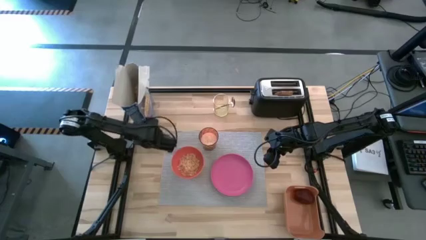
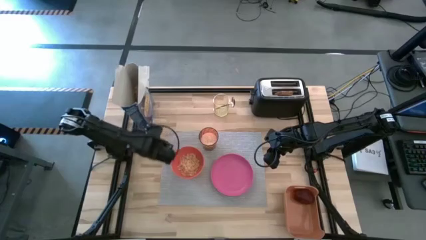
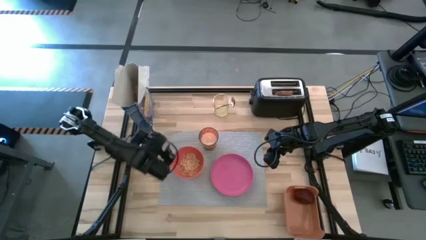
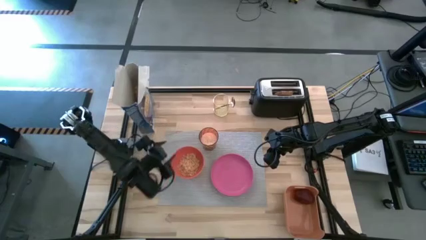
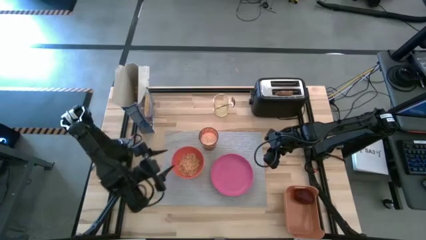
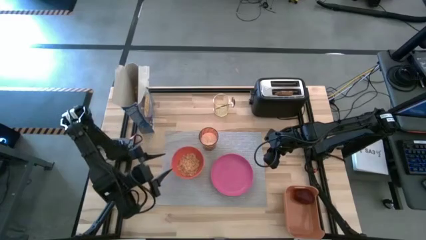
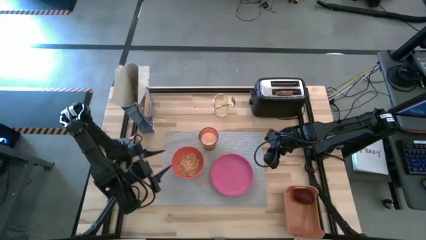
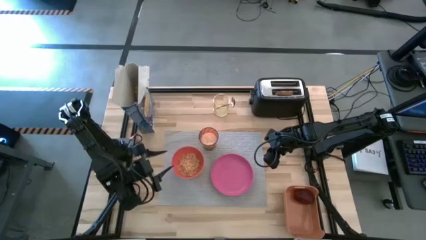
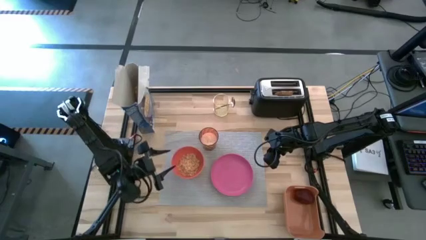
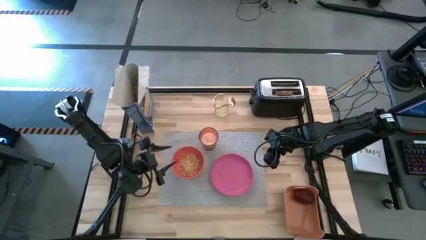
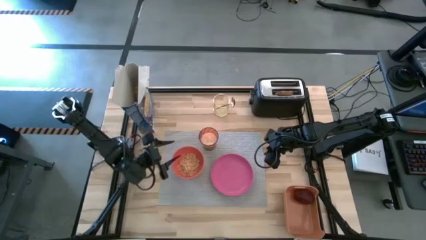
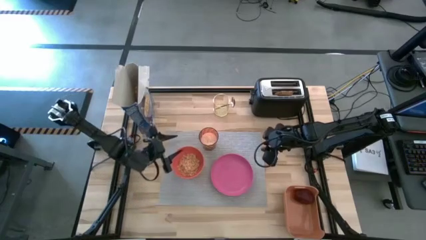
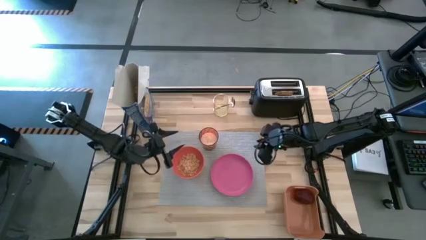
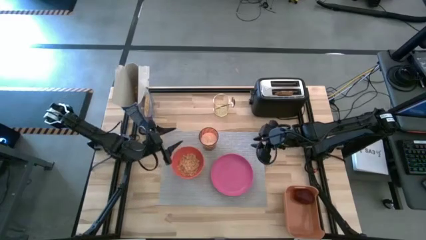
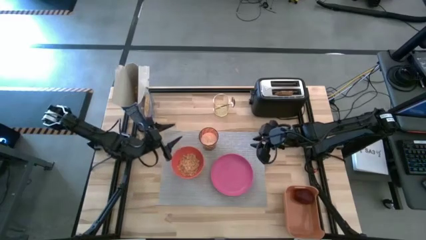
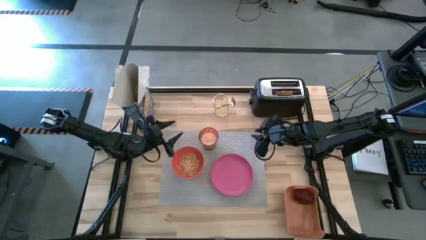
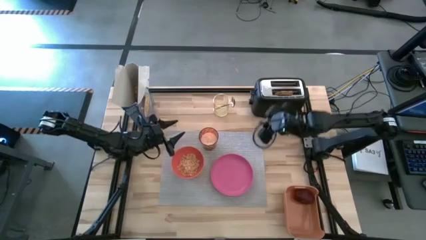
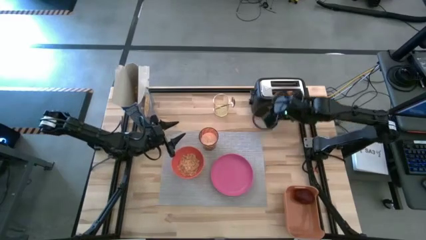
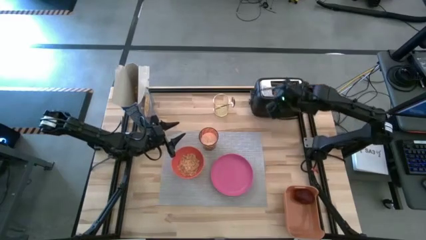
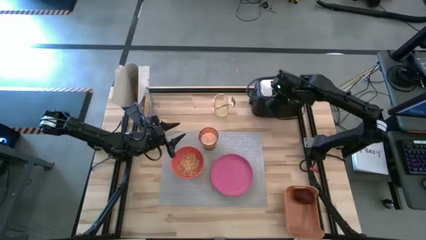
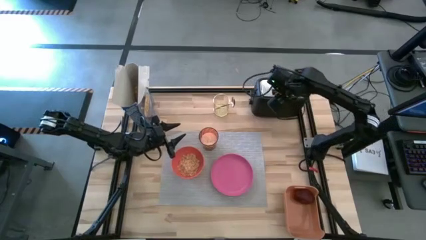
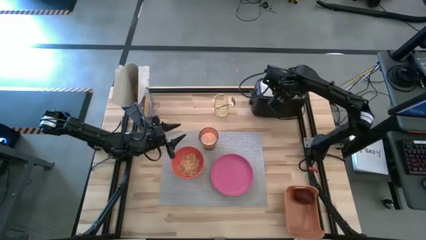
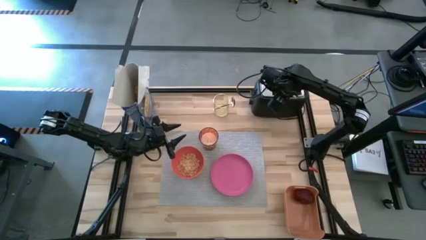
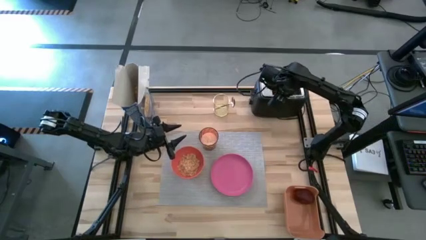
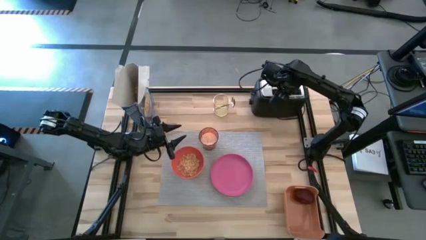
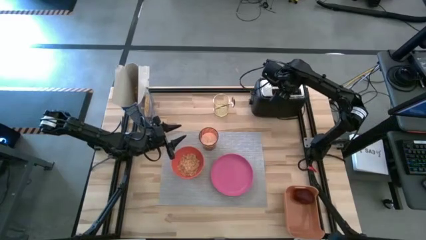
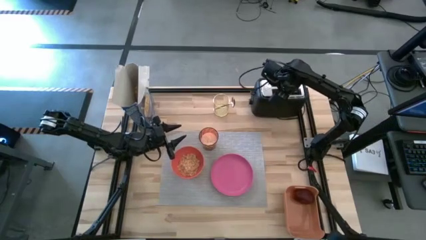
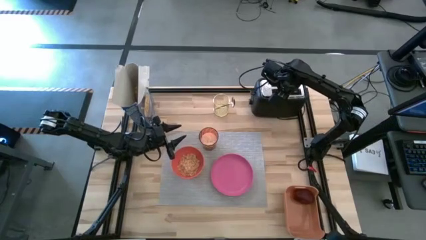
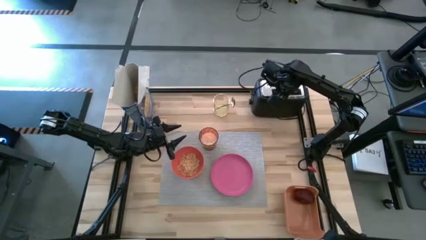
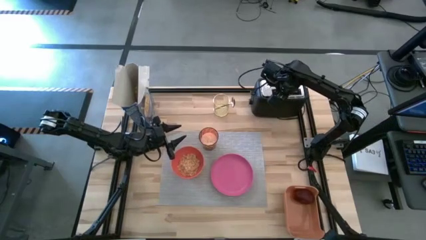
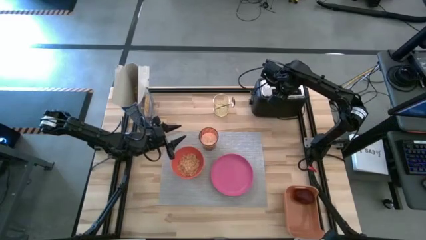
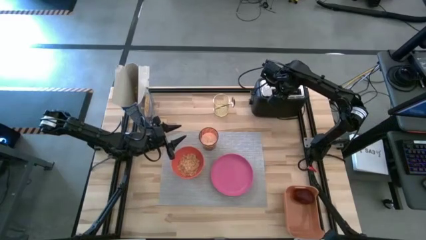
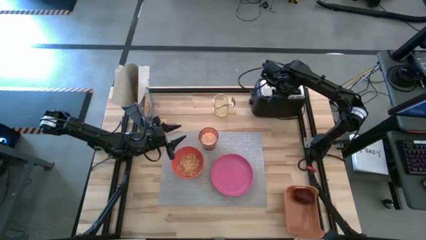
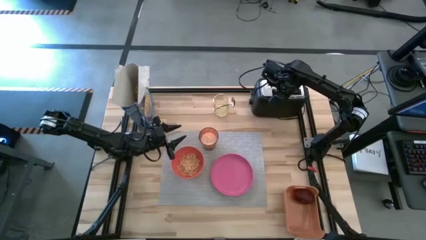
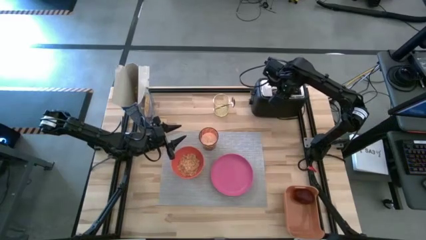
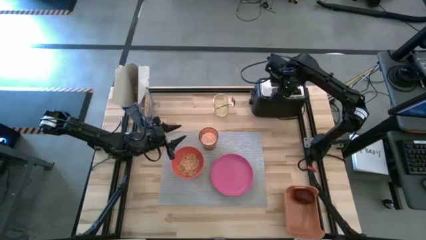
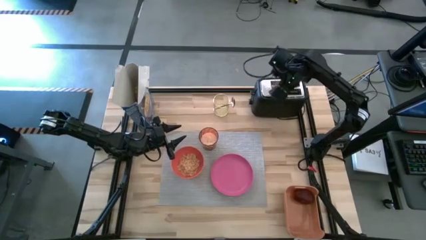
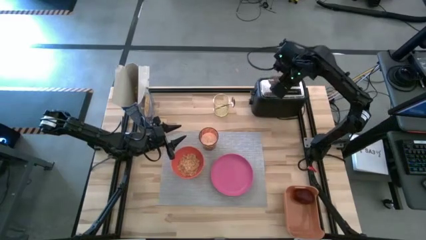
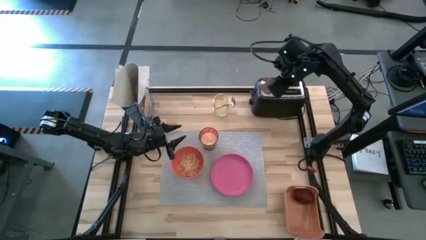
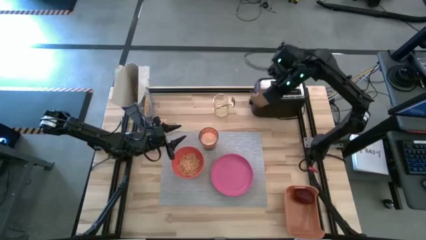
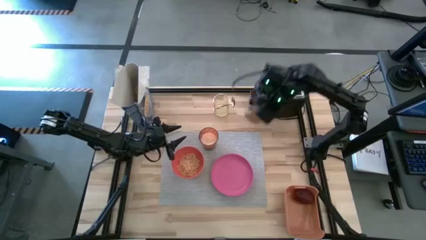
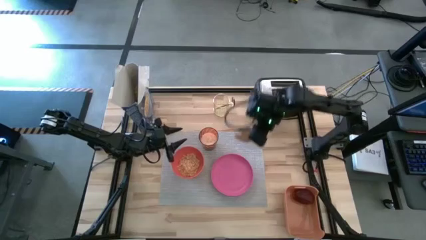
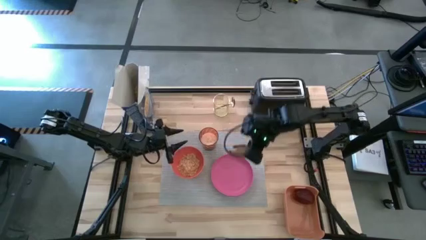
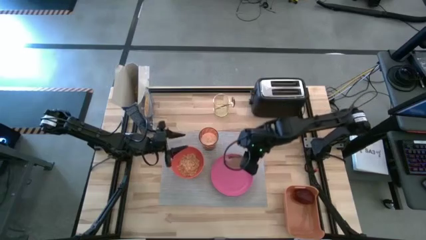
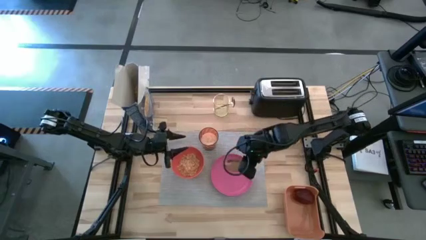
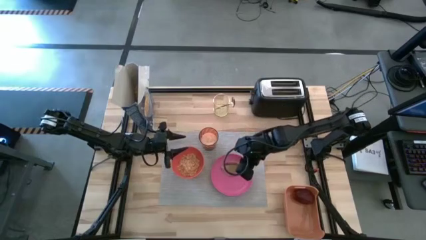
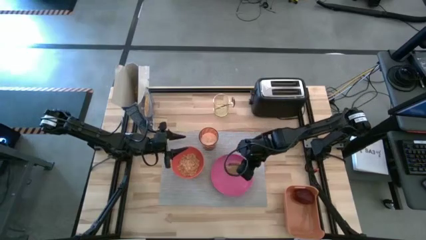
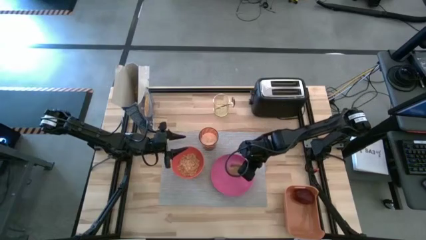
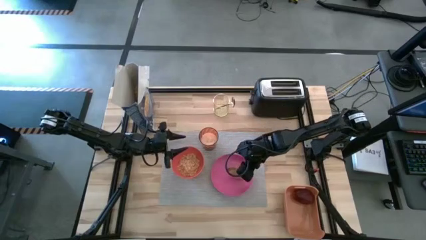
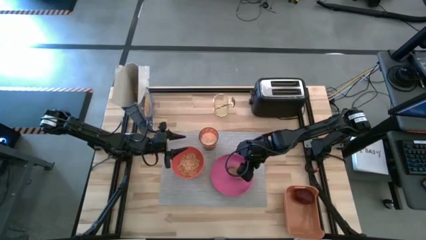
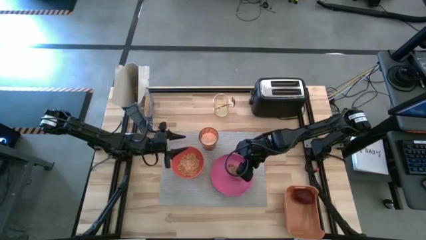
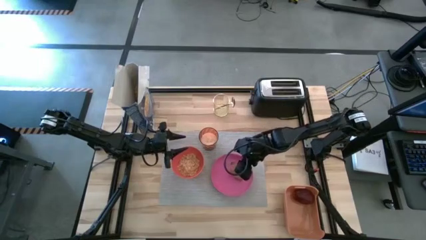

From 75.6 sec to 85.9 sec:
Task: Arrange a breakfast setting
Put the brown bagel from the toaster on the pink plate

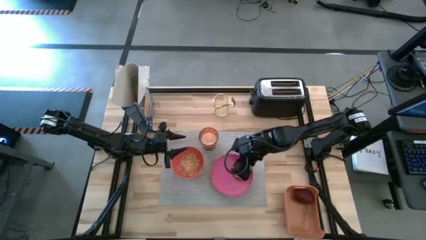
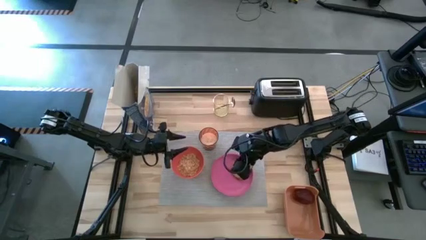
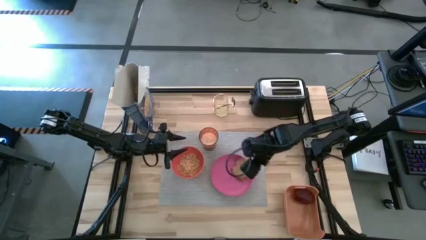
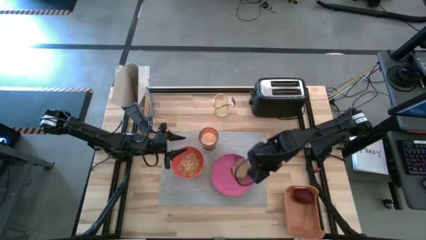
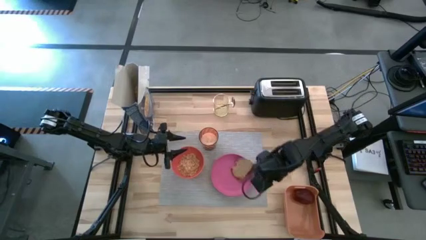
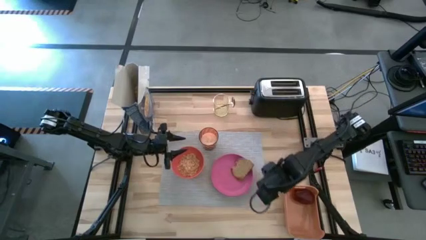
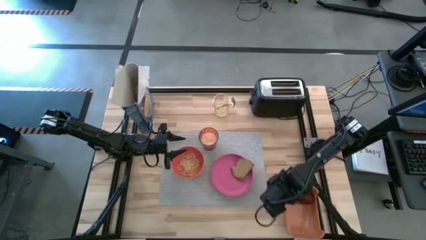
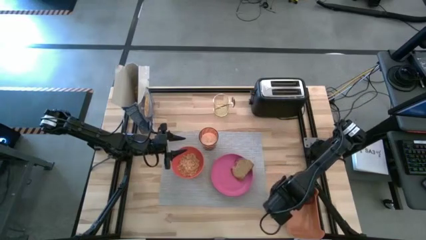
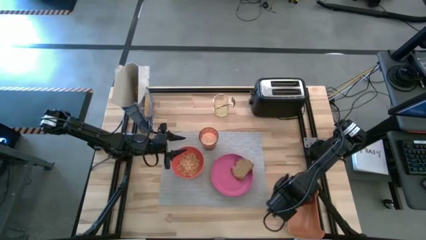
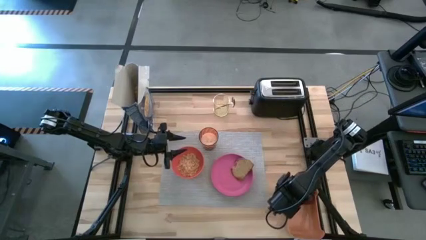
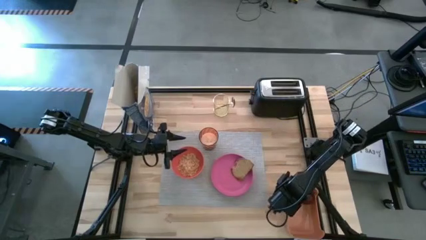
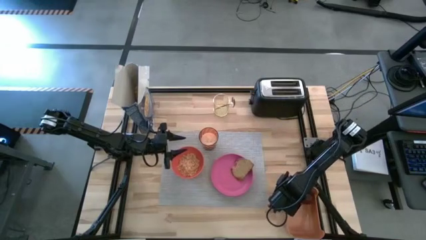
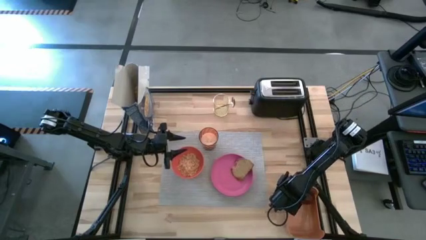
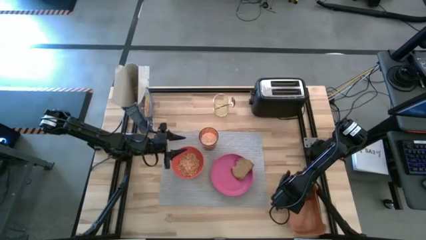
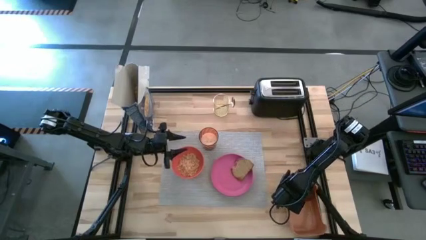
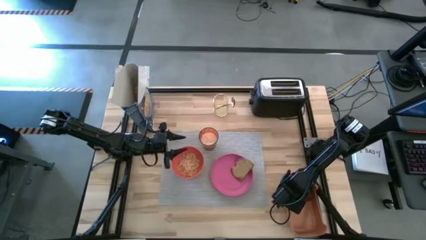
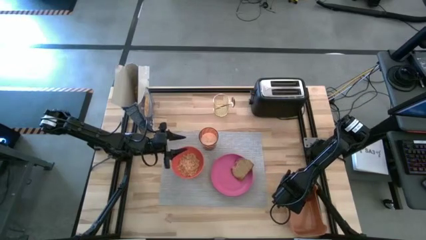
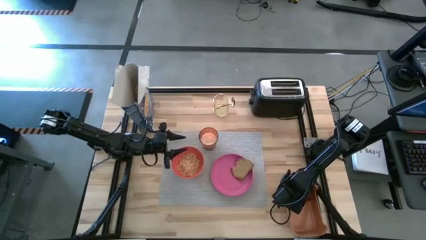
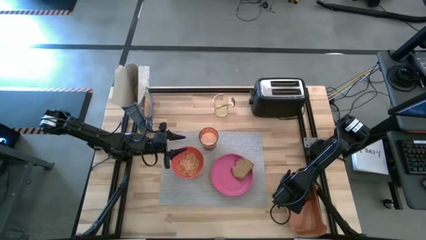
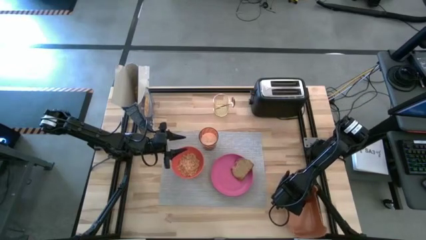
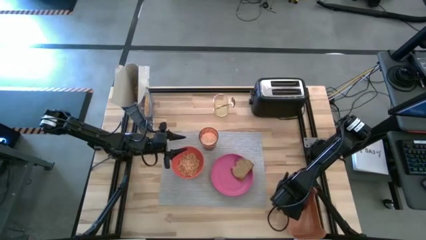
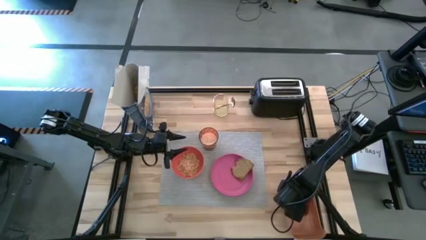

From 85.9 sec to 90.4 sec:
Put the red apple from the orange bin on the gray placemat
